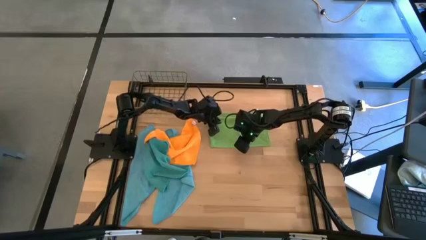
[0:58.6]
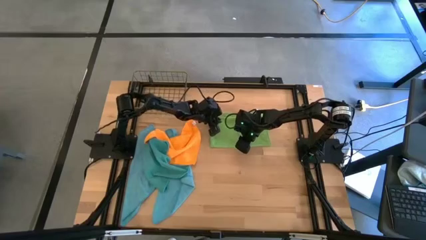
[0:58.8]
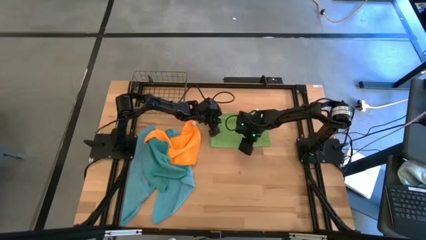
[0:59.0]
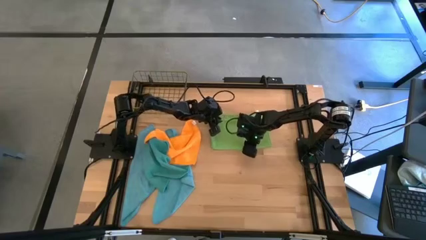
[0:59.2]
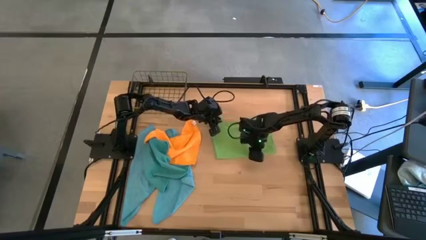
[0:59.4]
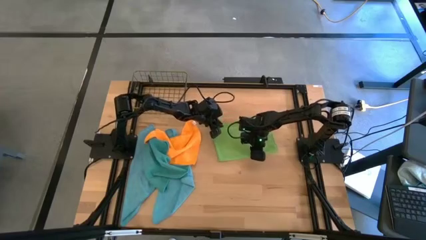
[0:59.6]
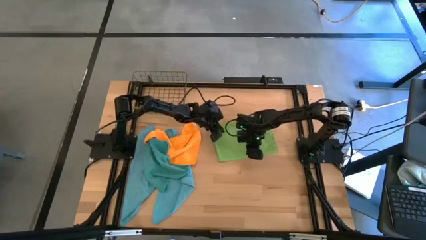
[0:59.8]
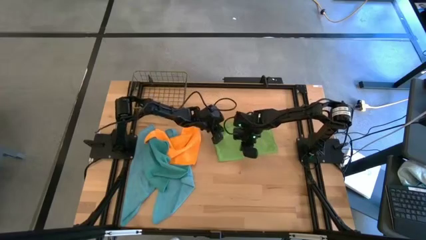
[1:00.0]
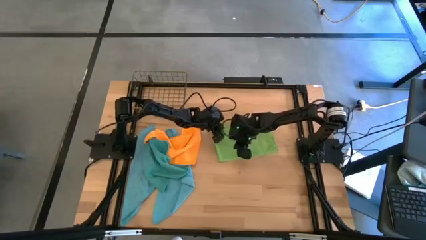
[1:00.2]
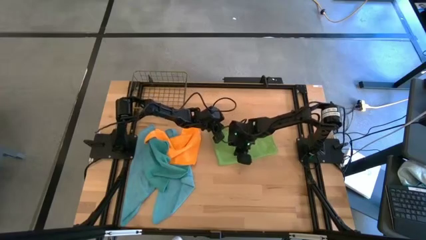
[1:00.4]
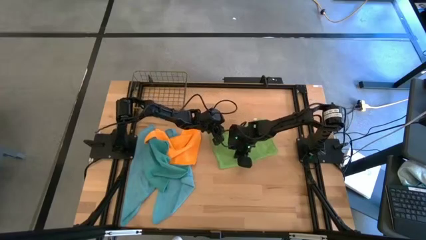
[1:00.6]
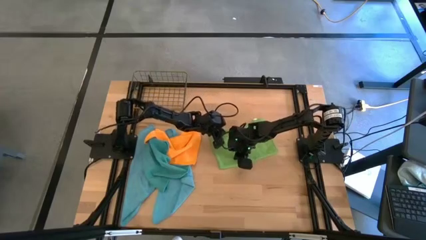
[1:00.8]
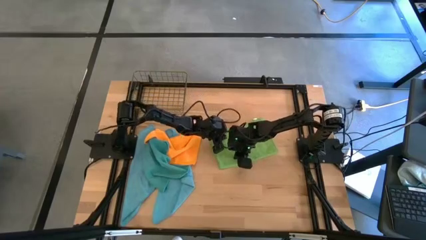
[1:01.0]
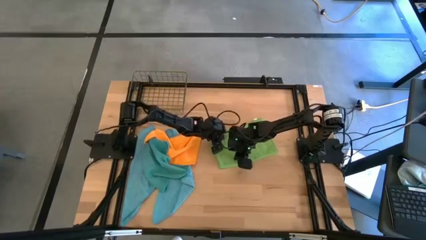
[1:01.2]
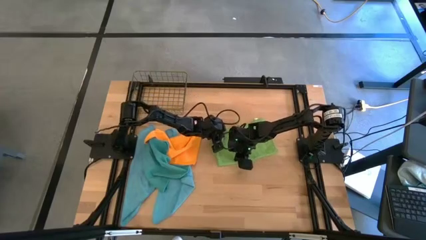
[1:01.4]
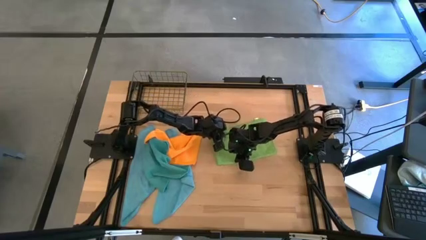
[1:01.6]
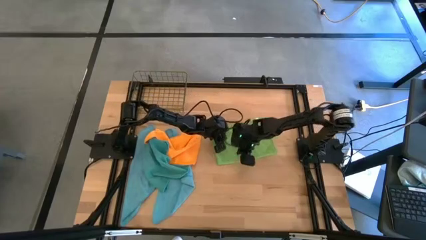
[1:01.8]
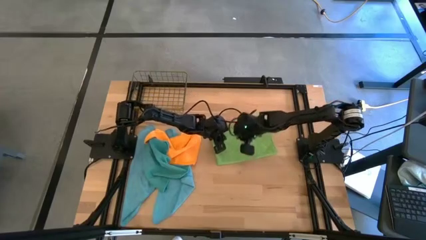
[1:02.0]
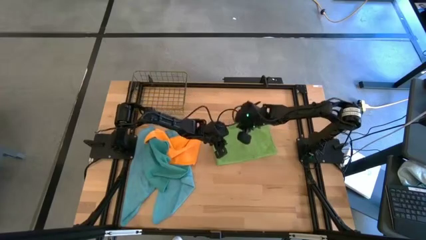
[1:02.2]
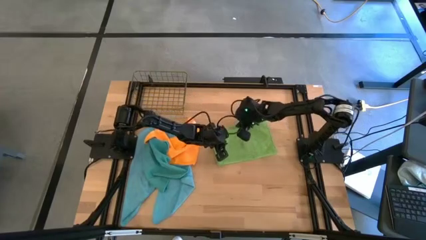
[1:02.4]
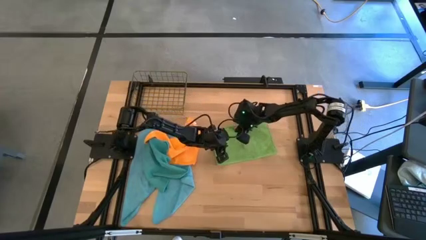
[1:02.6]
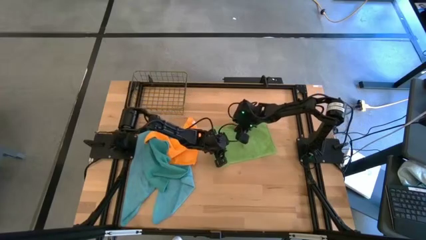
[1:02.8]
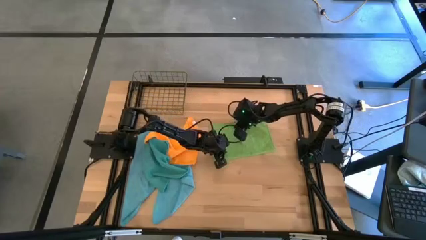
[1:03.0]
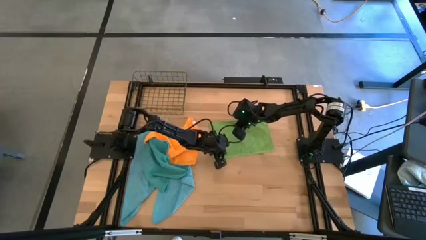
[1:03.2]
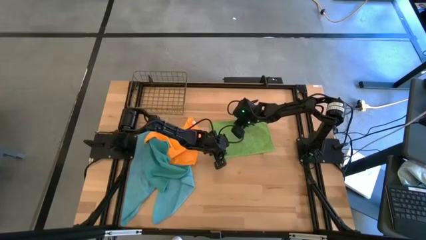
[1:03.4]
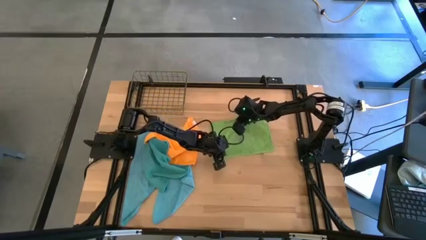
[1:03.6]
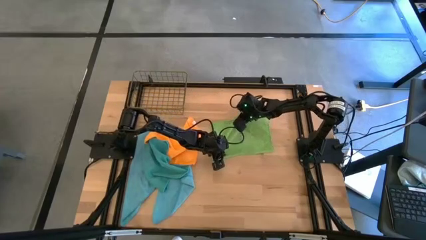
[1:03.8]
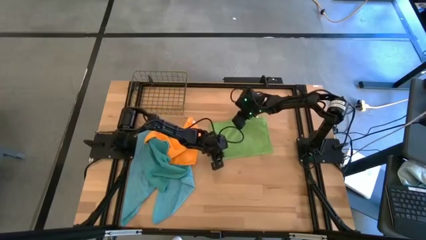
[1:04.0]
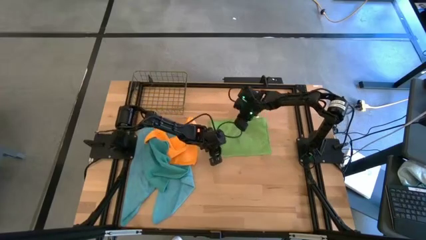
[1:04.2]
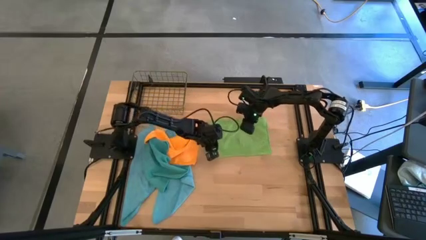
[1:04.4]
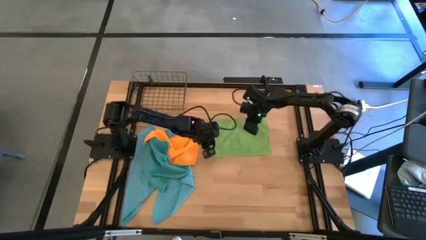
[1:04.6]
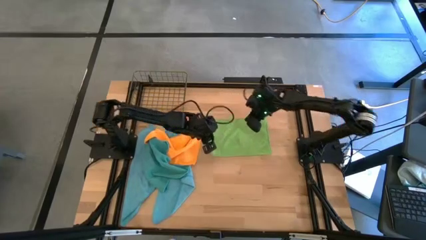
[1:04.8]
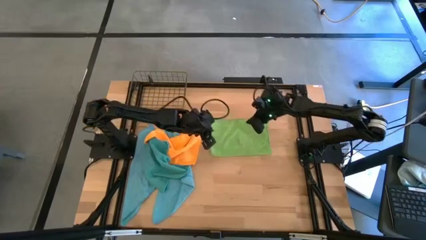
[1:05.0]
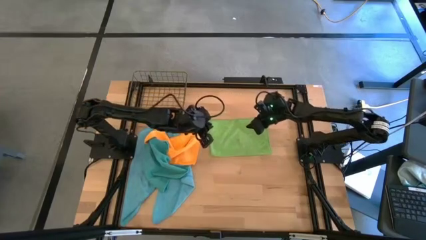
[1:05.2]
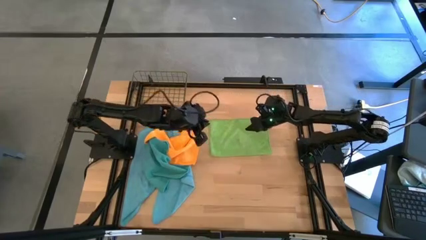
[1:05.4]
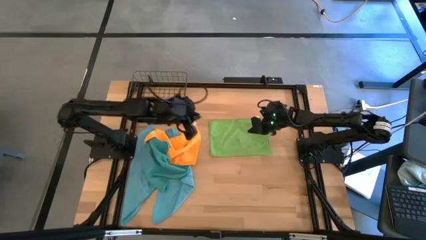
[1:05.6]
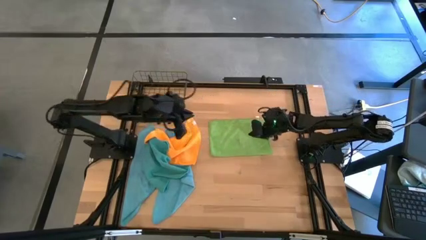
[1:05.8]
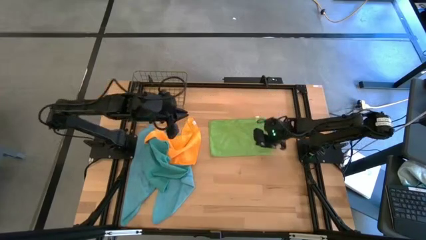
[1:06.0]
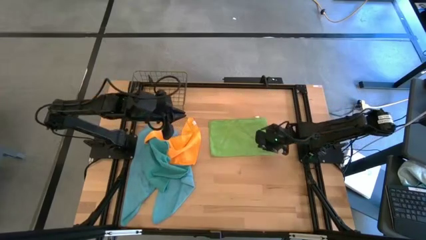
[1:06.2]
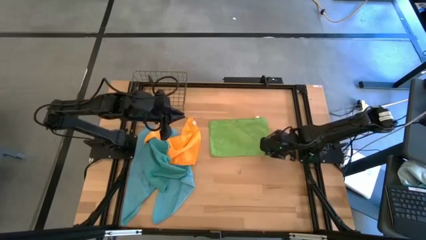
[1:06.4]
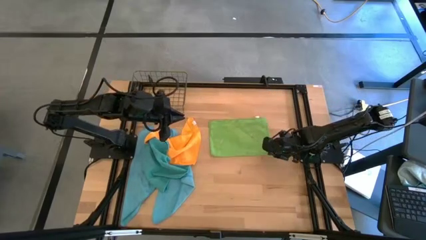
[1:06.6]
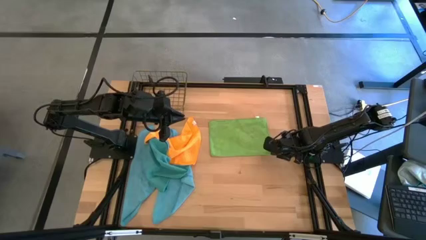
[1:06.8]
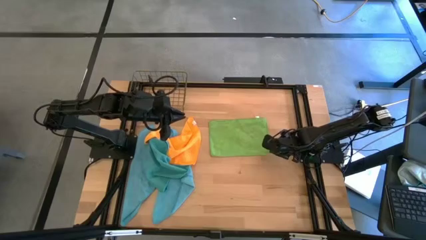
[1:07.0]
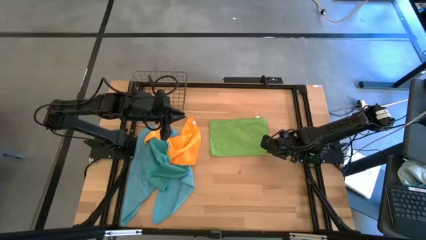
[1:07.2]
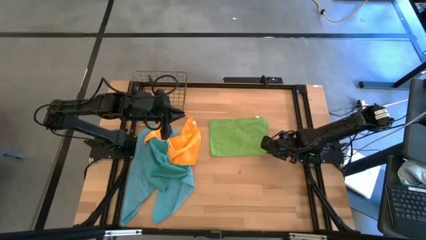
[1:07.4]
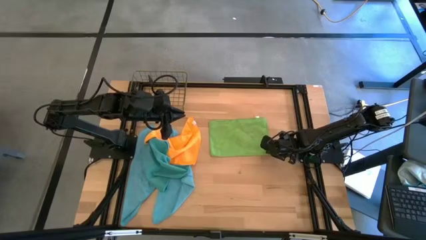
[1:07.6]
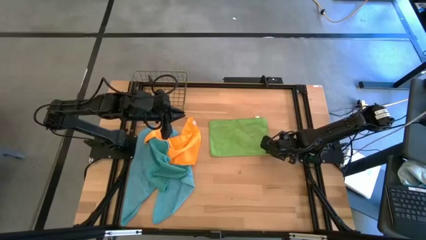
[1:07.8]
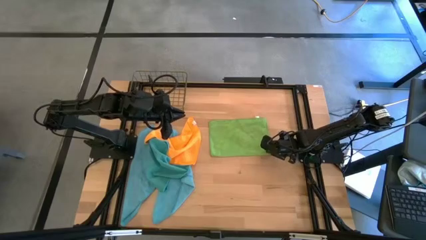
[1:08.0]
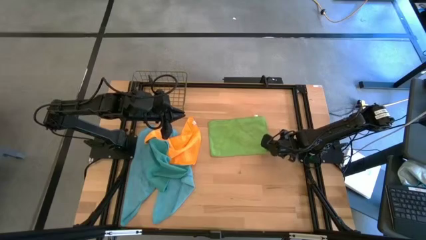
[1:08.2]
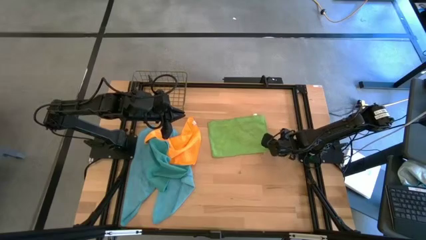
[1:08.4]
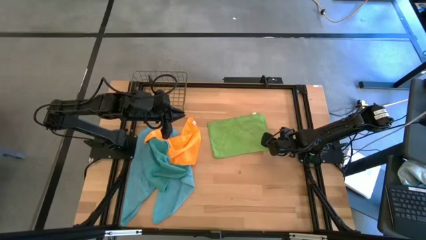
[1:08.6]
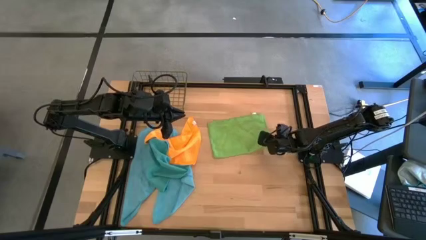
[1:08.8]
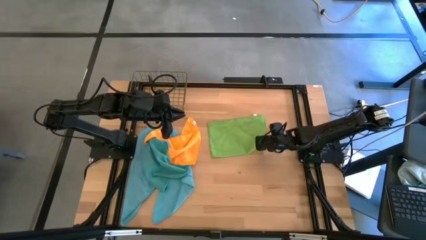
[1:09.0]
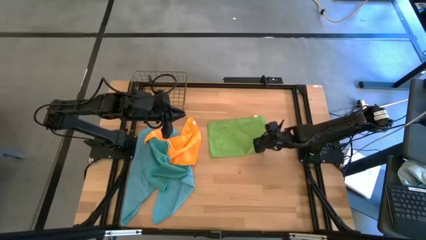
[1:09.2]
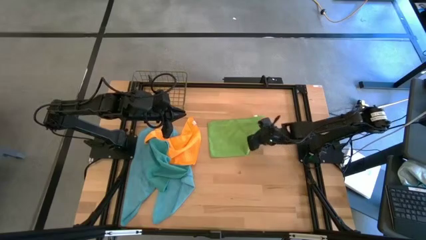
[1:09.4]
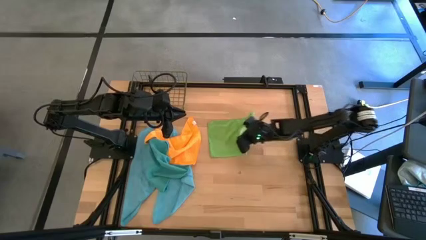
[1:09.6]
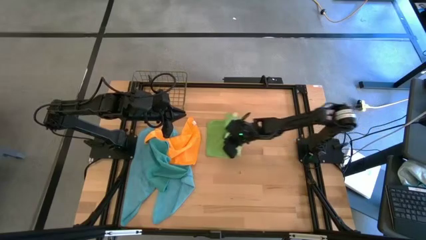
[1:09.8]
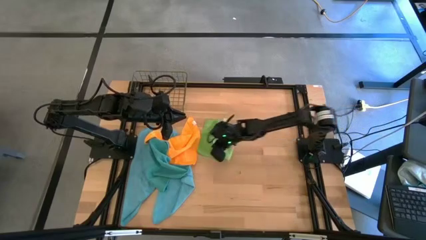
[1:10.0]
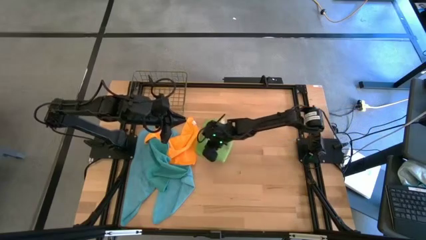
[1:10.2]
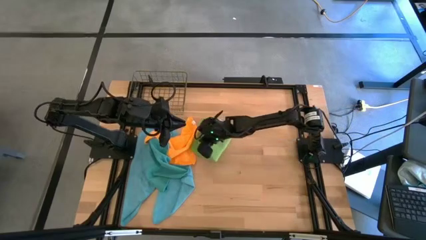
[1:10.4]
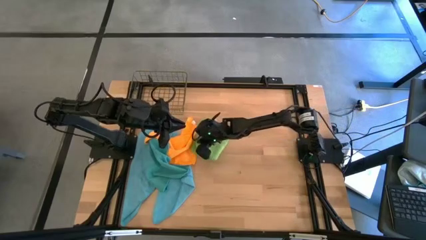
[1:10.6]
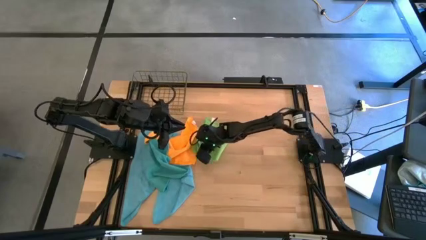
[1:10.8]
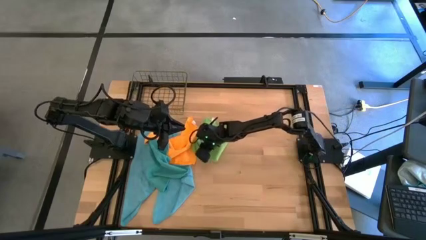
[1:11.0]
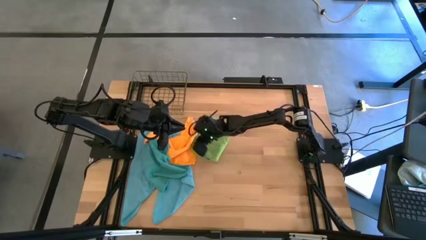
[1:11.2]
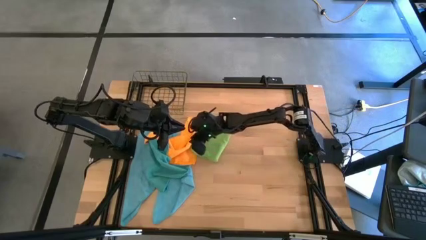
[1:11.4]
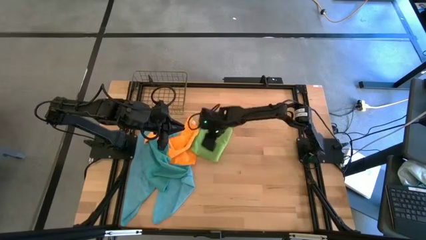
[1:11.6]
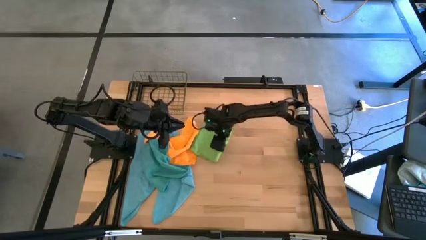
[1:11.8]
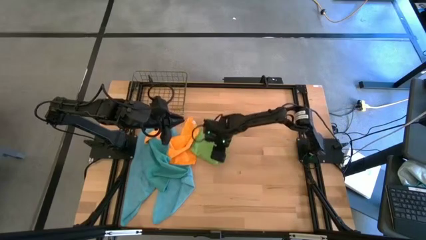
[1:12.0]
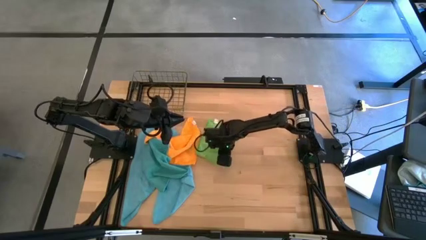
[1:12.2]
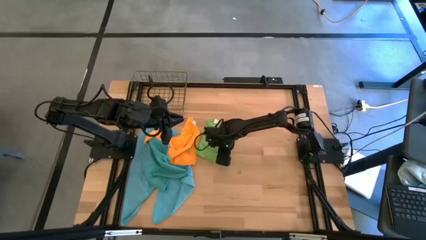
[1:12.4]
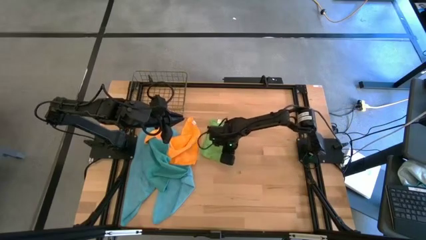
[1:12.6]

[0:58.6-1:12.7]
Task: Fold microfiber towels
Fold the green microfiber cloth

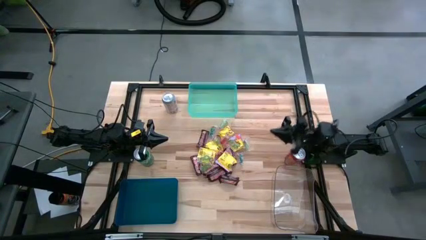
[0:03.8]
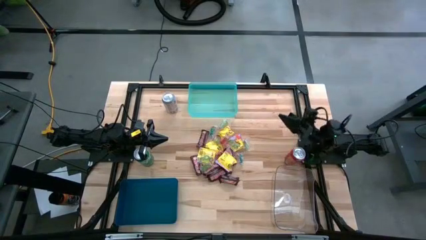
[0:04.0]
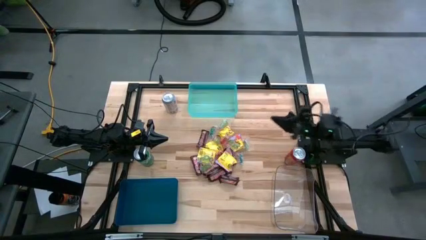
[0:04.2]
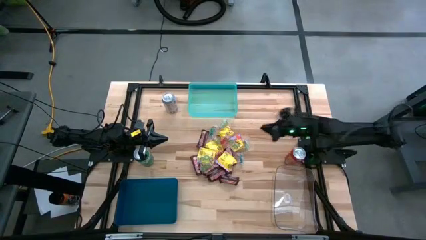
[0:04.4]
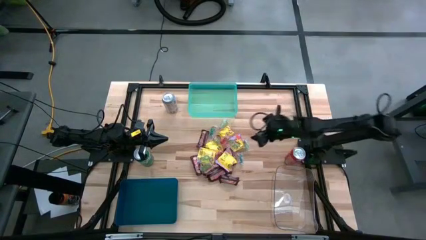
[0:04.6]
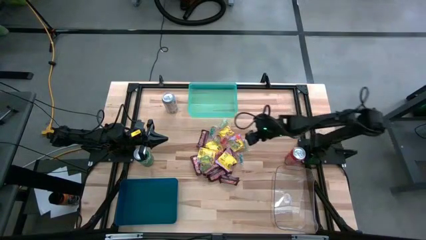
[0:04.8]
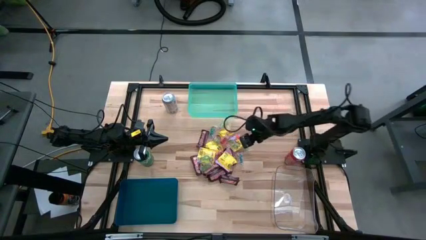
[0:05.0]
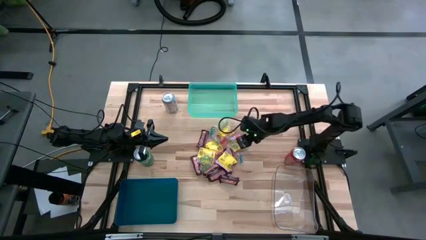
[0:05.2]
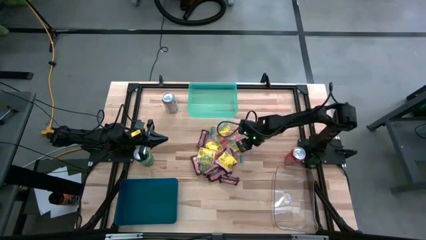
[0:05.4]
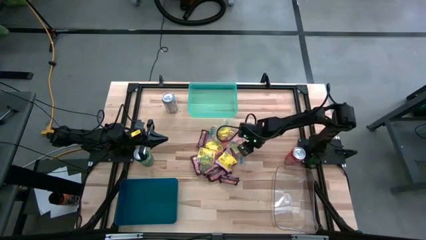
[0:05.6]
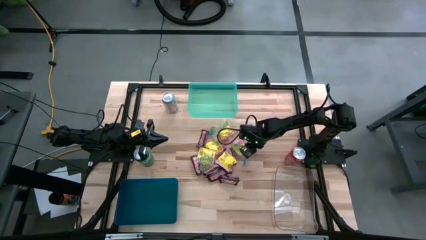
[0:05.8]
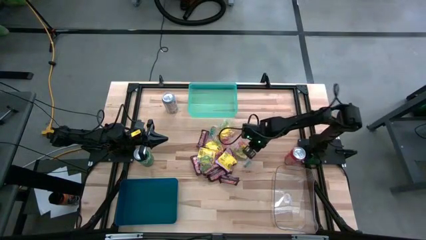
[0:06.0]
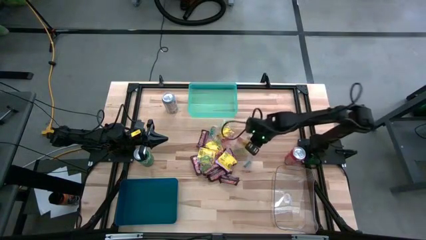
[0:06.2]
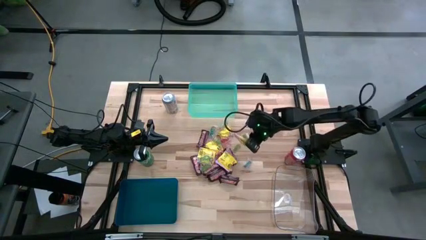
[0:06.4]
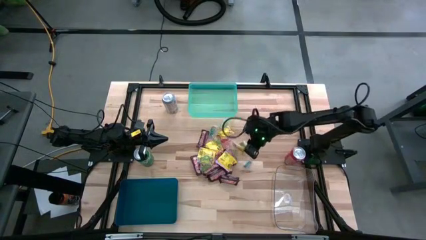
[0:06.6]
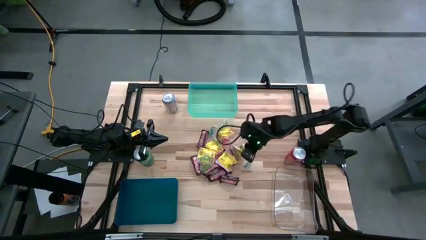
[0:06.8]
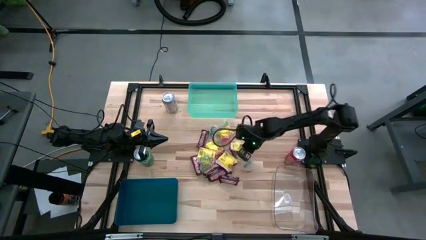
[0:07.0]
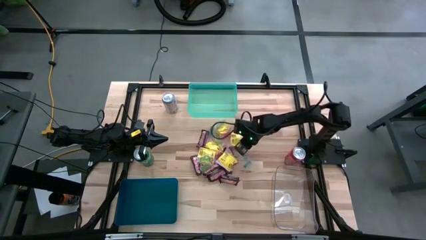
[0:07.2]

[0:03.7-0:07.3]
Task: Sort candy
Put the green gummy into the light blue bin

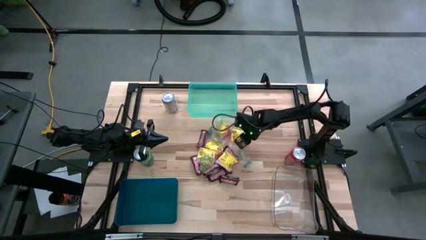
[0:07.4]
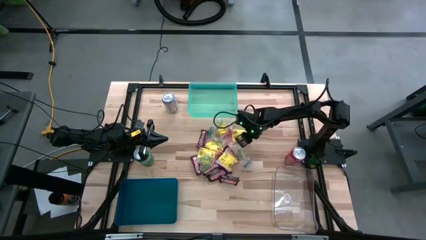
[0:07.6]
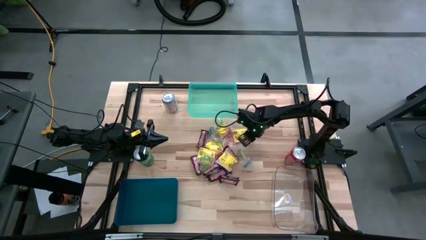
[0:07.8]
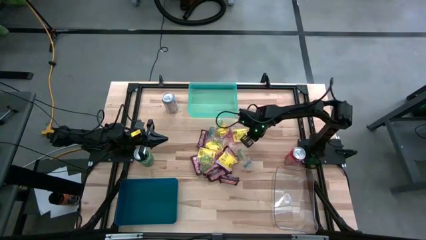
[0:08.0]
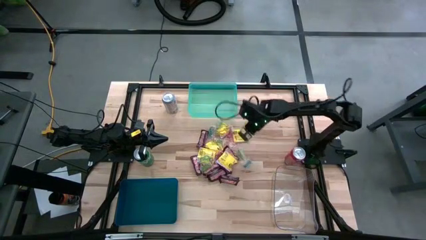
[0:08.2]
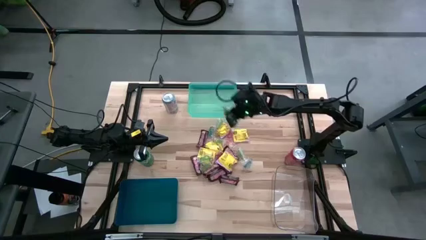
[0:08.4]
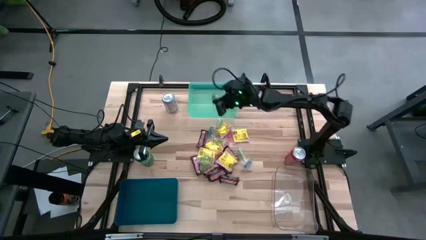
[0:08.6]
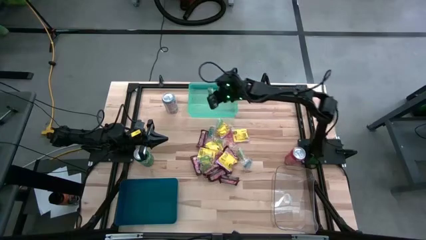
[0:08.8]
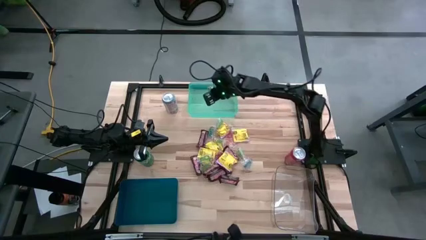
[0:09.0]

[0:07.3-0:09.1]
Put green gummy into the light blue bin
